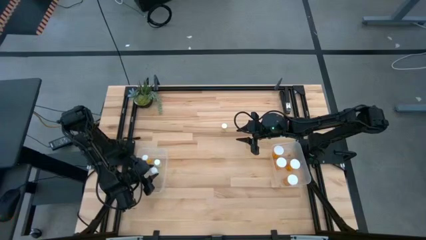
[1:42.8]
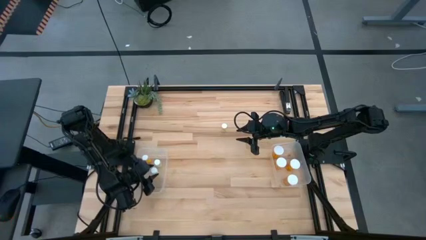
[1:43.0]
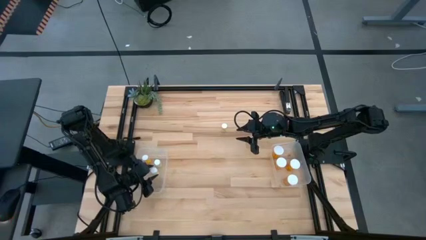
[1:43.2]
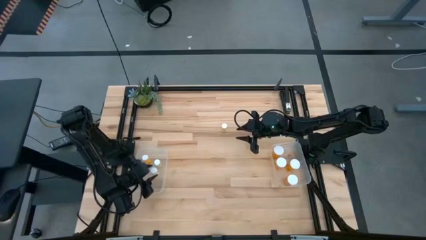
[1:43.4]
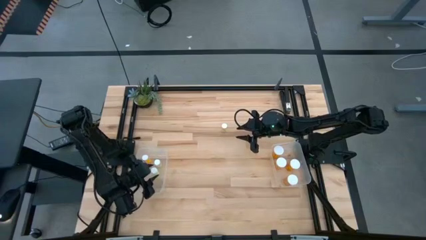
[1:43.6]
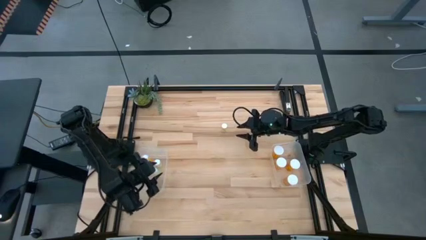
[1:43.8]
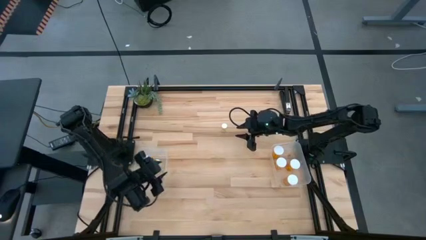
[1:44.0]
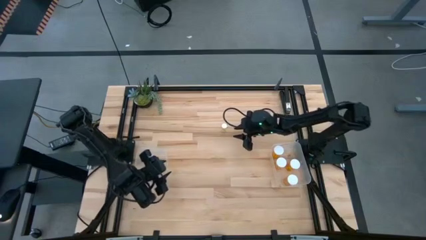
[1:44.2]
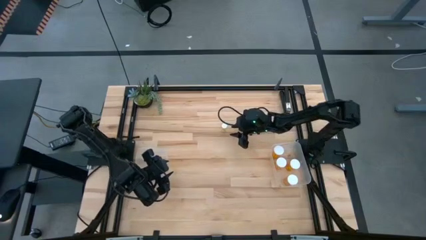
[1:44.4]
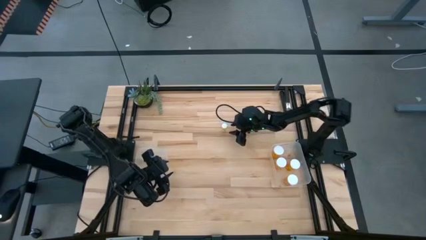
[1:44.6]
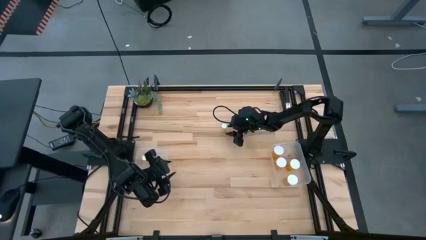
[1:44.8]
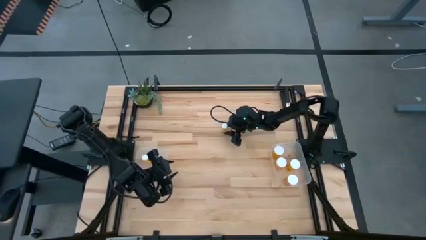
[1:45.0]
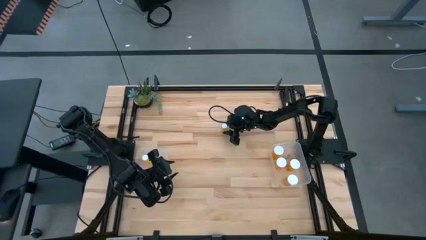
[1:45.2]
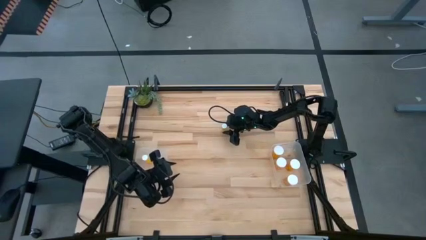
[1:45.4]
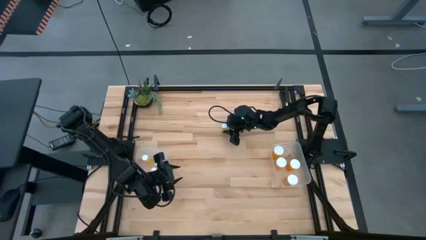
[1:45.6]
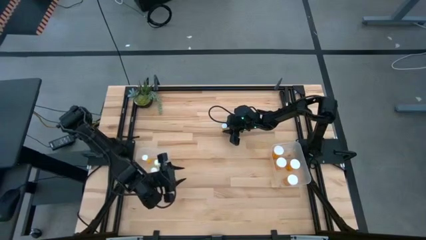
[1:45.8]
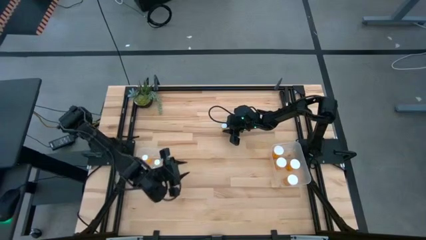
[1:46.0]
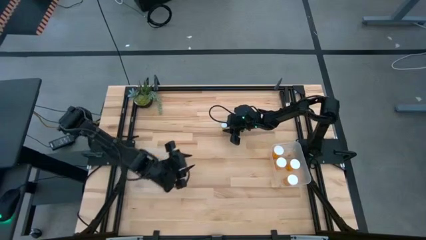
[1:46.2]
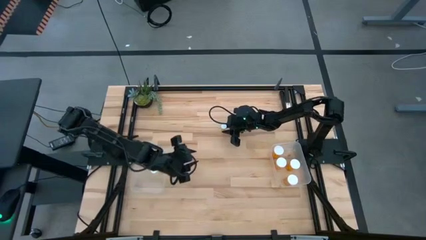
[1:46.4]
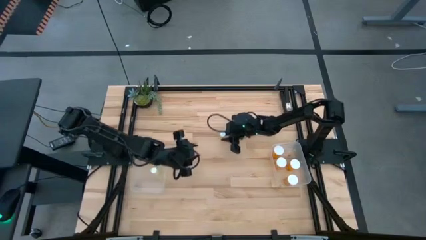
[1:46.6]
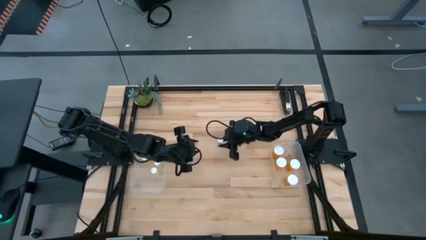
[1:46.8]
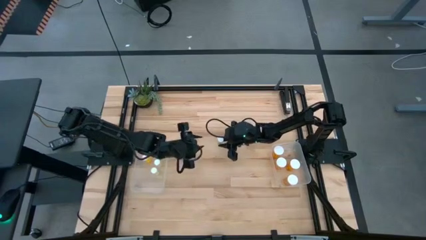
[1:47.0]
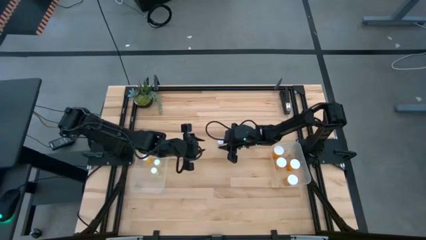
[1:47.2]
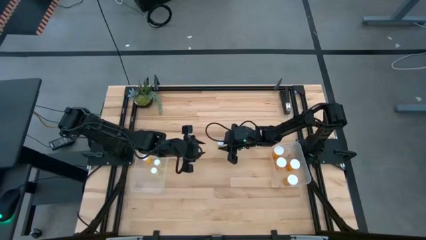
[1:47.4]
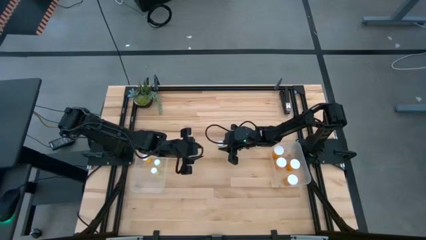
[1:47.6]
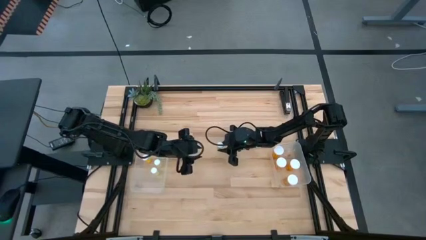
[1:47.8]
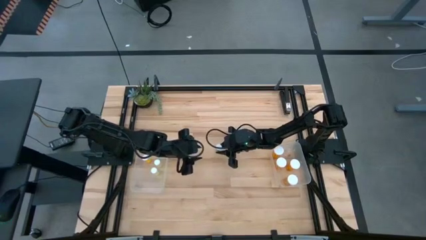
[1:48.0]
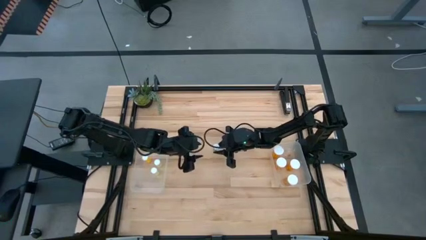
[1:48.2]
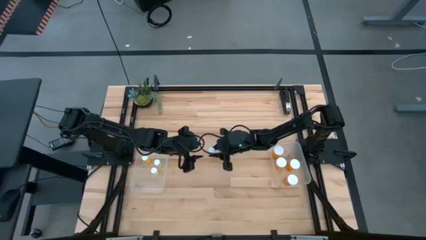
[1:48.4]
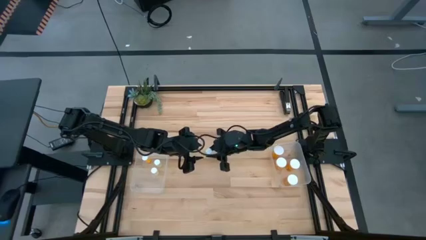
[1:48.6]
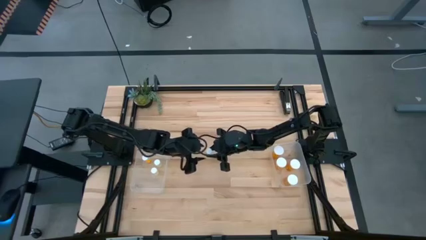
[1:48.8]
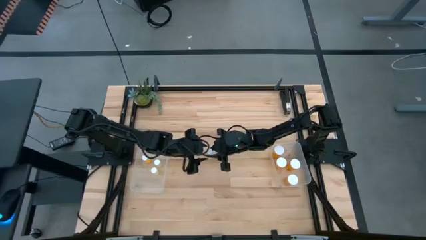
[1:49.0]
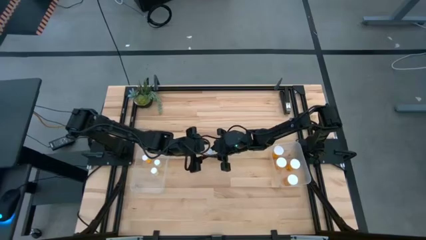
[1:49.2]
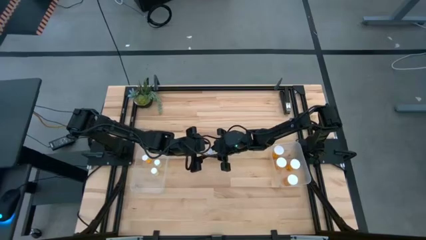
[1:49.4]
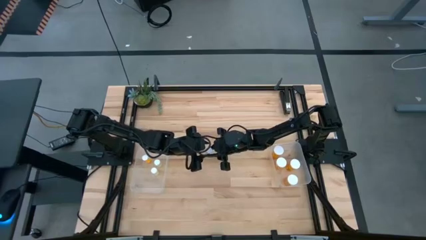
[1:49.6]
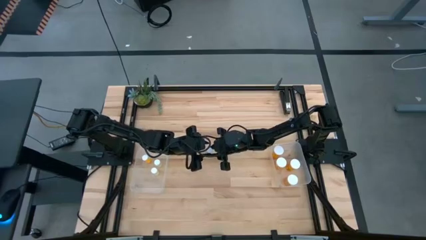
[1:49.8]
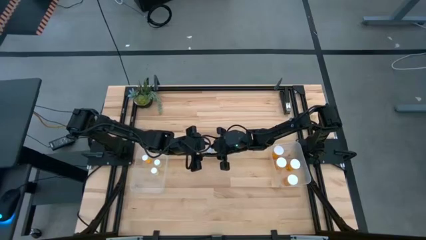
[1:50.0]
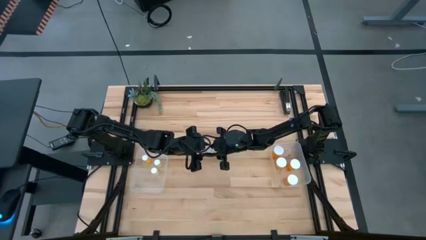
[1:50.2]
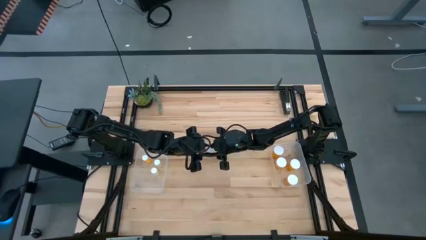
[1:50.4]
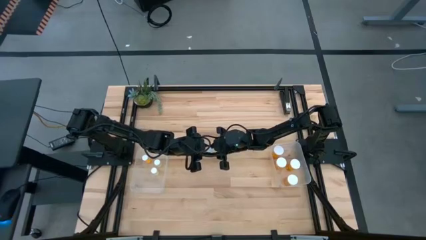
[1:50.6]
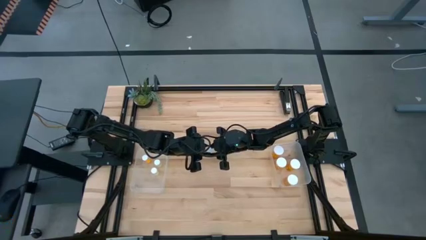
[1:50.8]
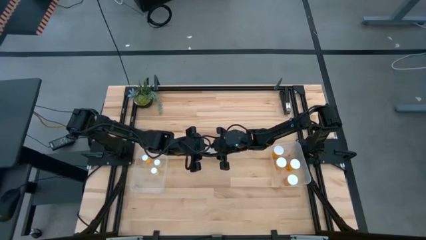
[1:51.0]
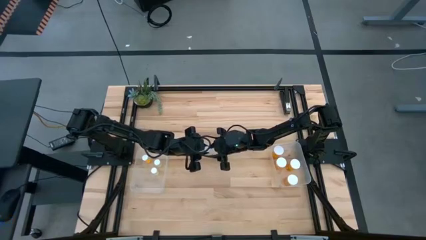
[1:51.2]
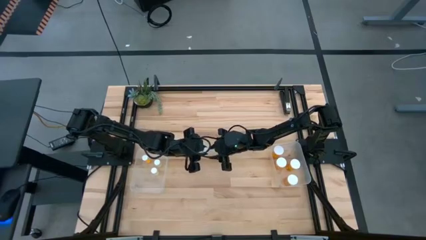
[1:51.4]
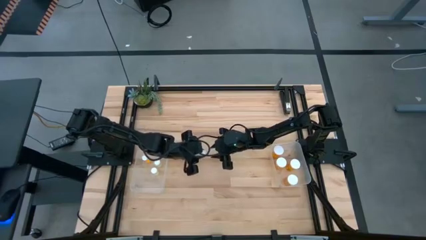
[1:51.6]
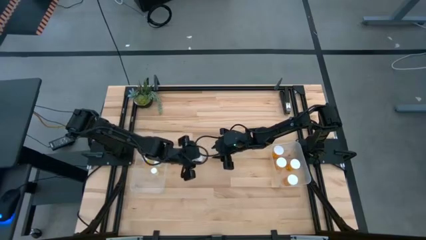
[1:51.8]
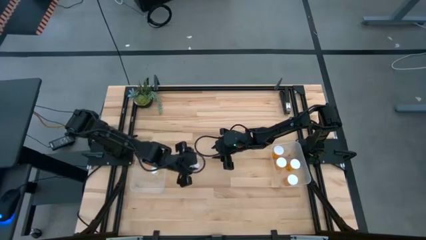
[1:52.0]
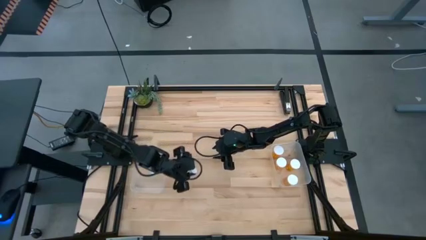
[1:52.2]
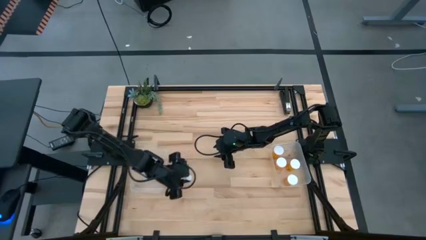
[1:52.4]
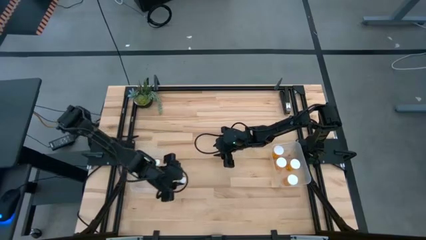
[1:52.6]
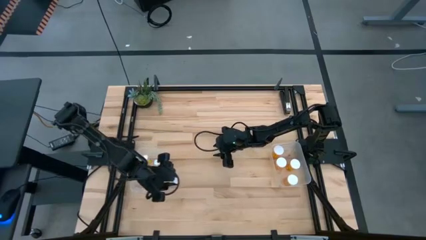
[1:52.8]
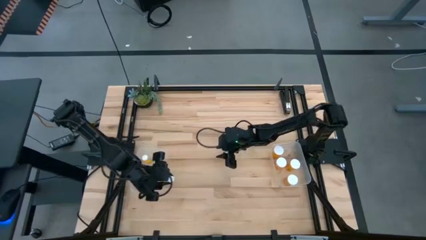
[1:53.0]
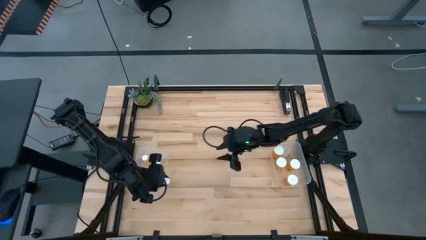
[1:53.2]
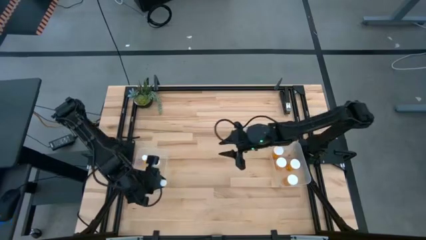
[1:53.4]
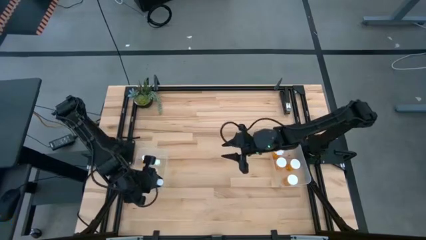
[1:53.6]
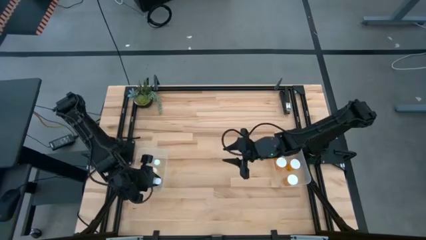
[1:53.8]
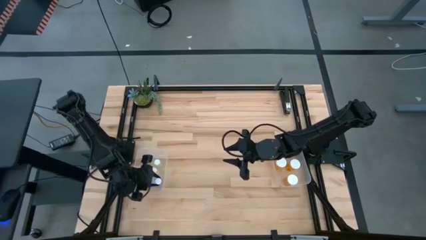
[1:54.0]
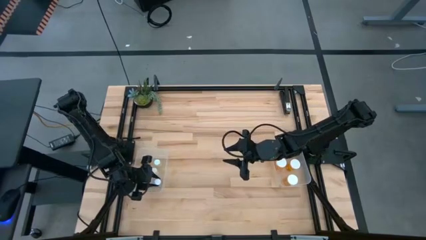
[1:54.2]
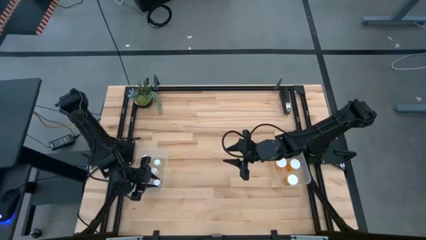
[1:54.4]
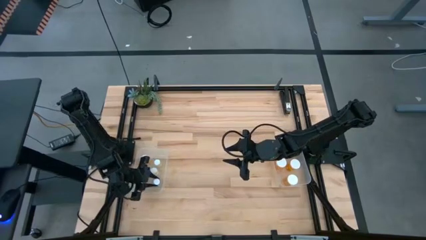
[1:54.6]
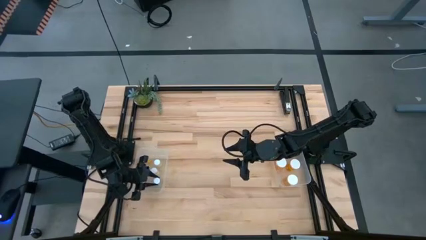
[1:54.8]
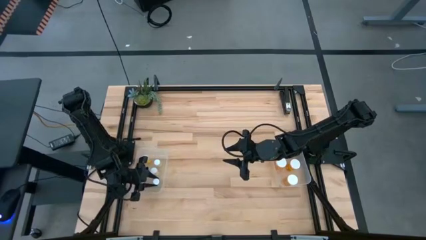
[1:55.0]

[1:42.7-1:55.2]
Task: Pick and place medicine bottles into bin by pill shape (circle, oval)
Put the small light yellow pill bottle into the left transparent bin

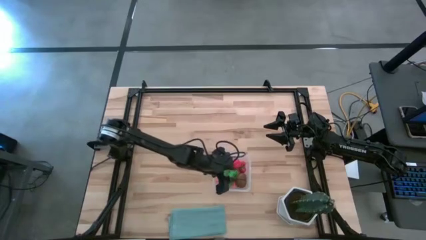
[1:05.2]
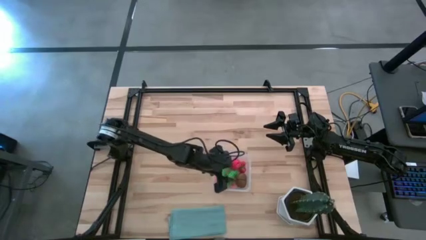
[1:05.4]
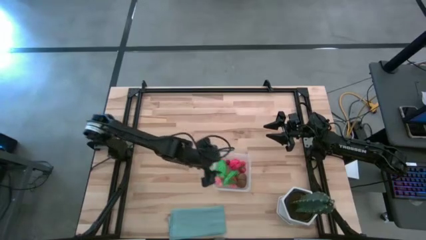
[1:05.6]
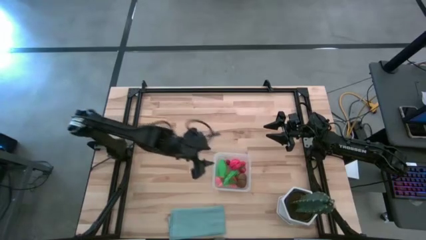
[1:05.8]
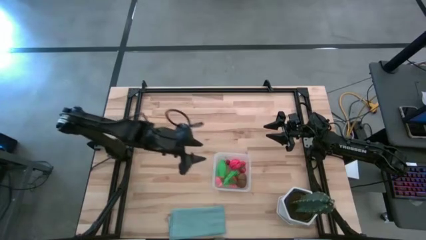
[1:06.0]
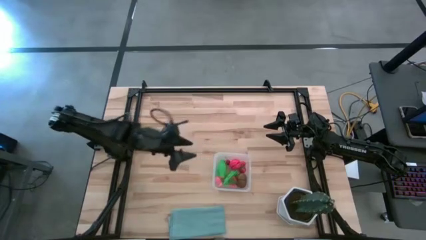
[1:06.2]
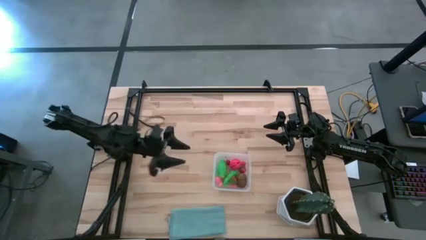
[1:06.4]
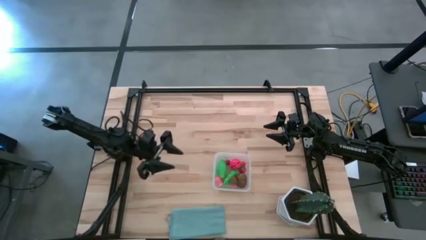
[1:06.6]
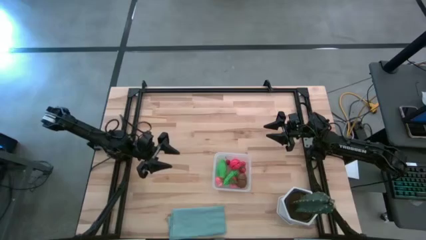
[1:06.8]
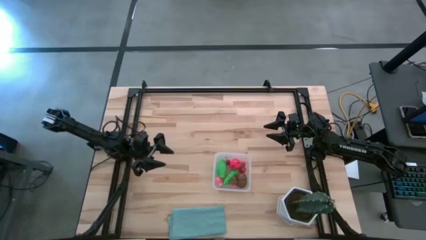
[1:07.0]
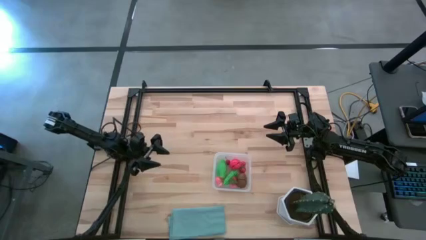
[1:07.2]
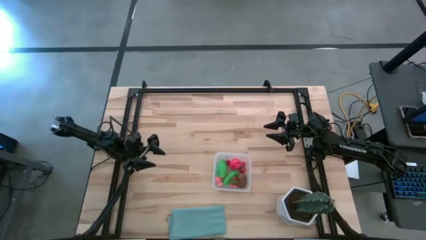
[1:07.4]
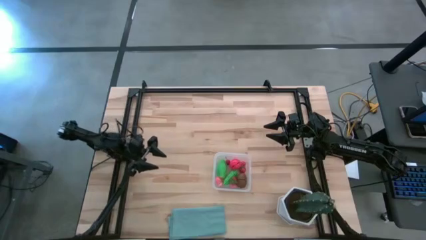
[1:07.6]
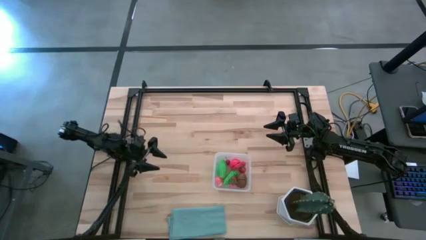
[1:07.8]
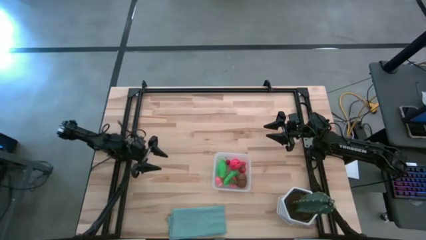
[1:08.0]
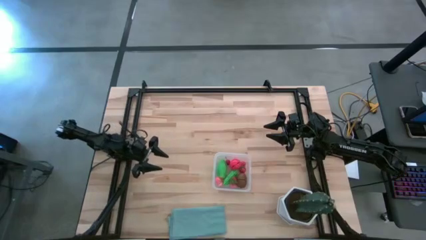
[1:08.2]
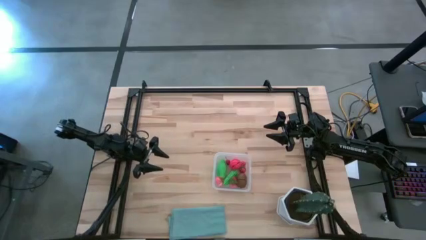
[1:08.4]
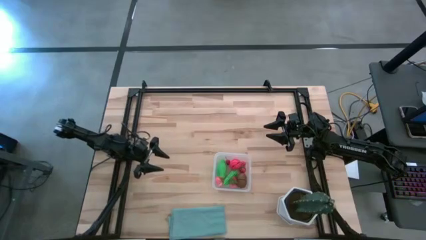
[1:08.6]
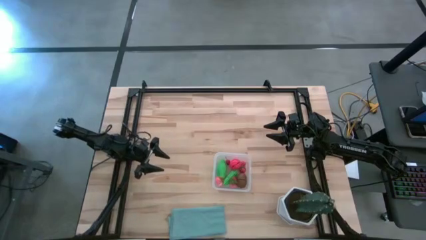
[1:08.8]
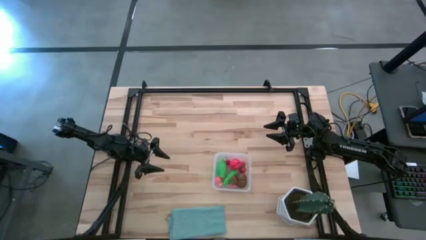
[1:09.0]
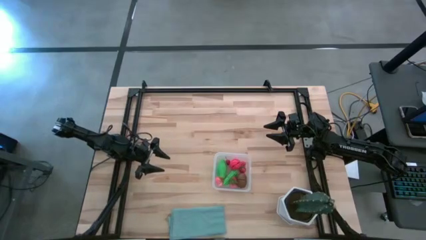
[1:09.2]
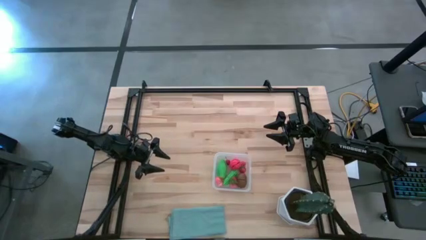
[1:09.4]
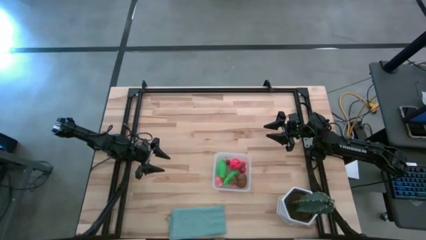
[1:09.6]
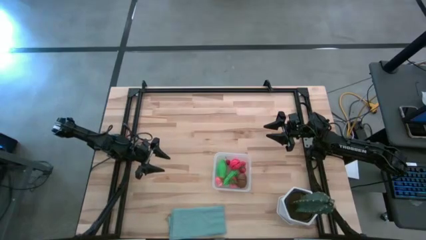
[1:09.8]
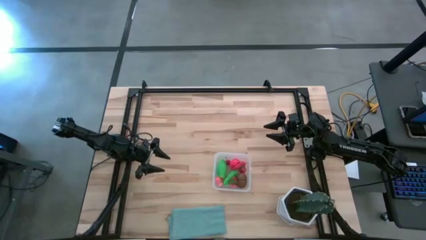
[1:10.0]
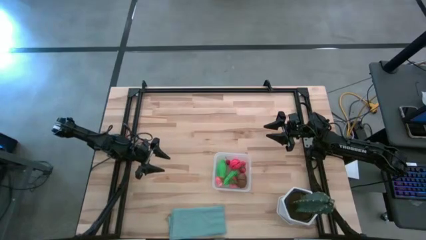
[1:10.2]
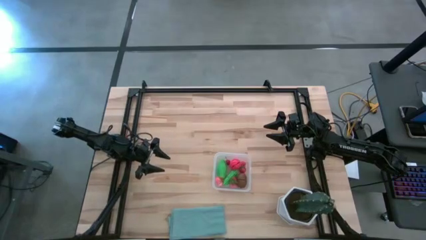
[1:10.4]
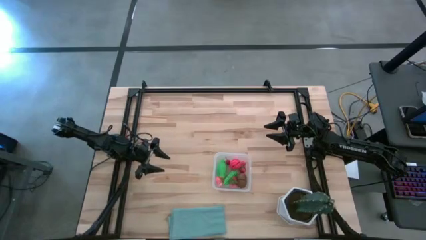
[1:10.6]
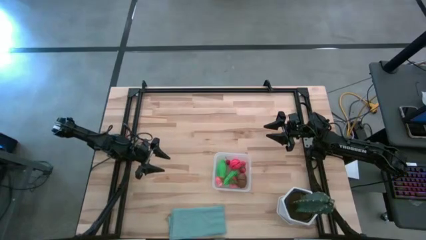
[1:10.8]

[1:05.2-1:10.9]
Task: Pick and placing Produce into tupperware
Return to Home Position
